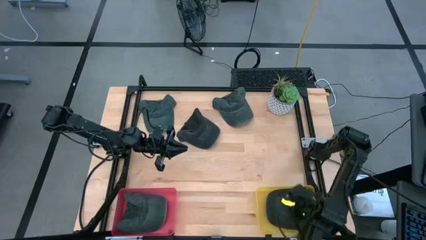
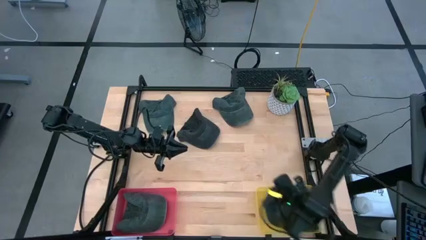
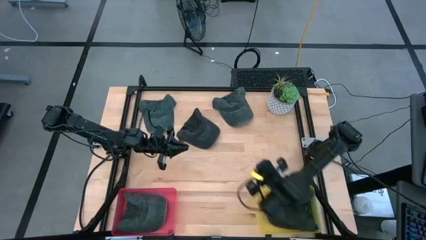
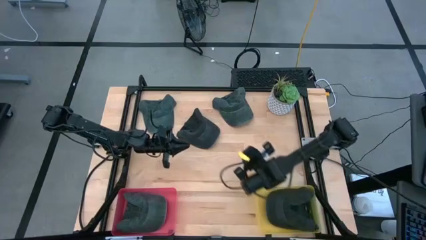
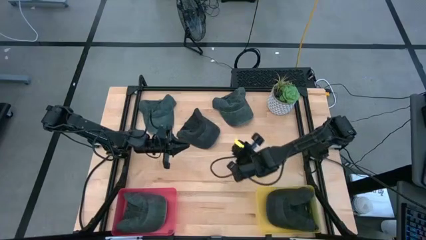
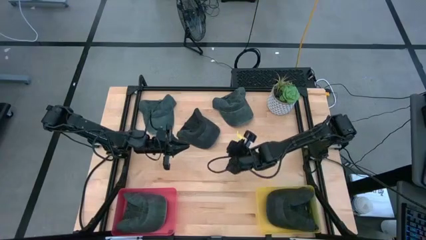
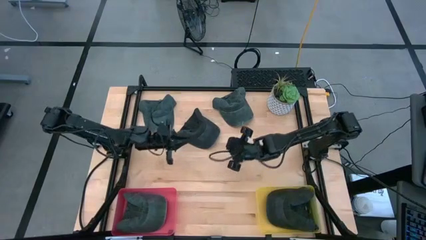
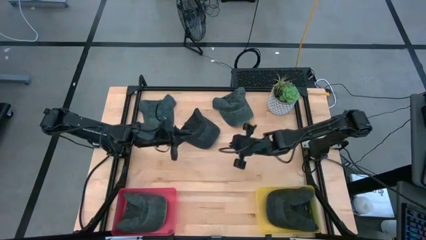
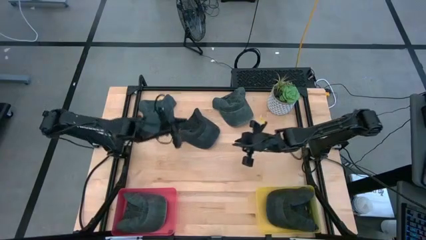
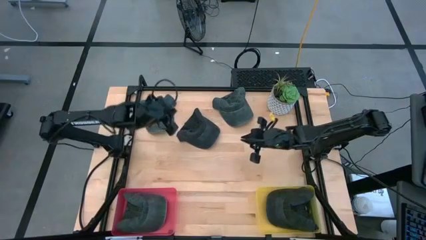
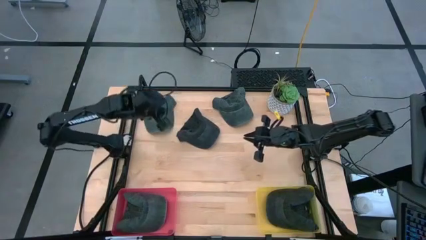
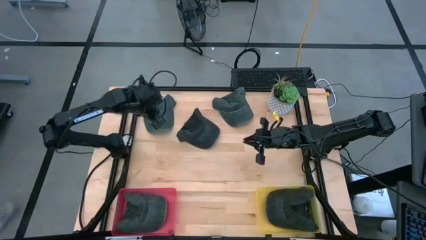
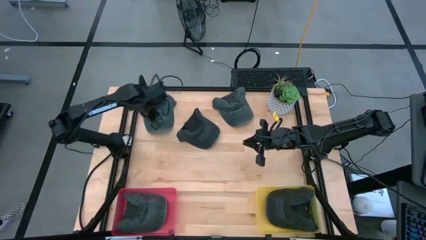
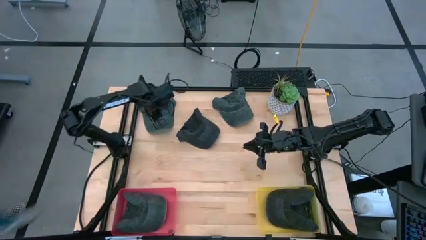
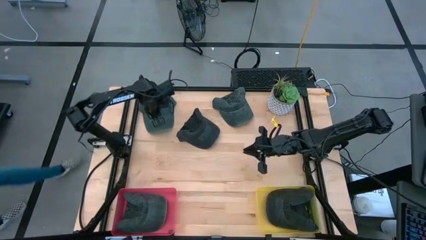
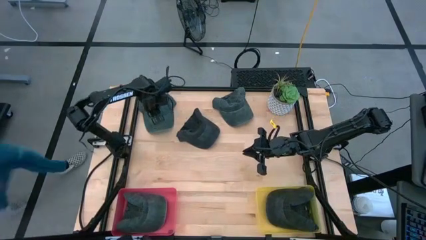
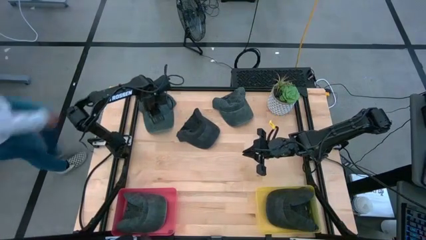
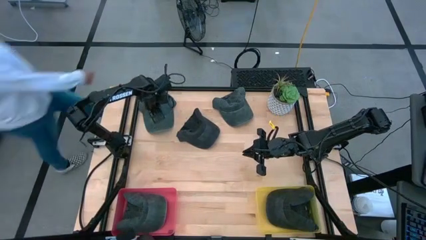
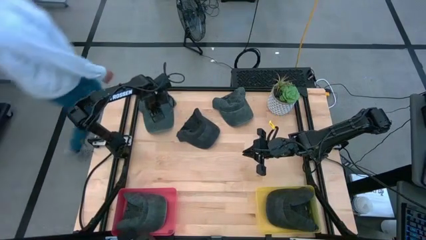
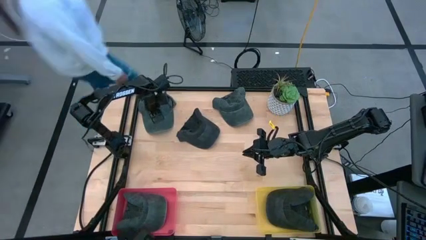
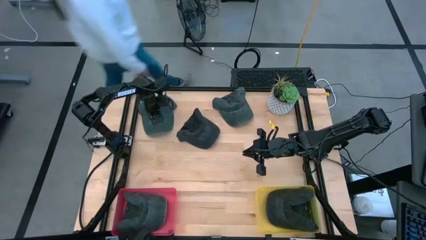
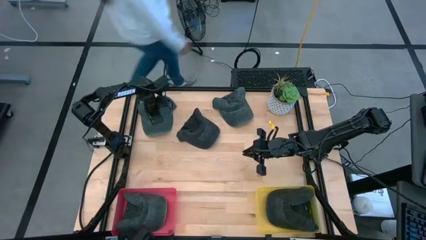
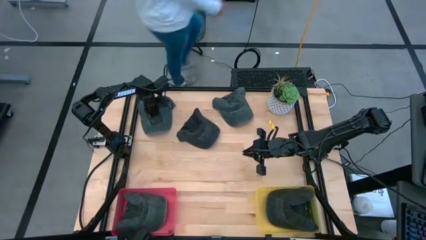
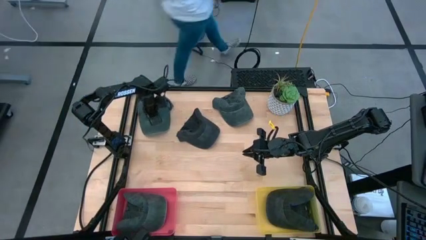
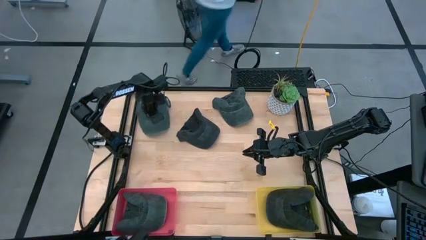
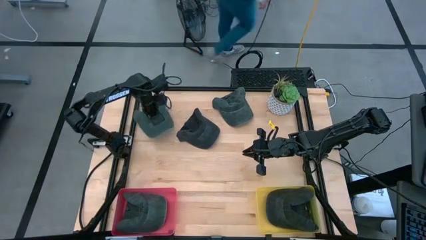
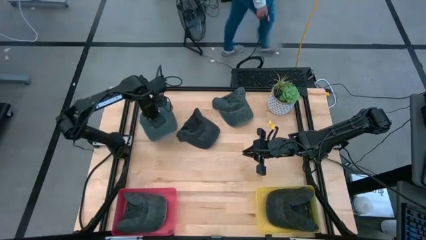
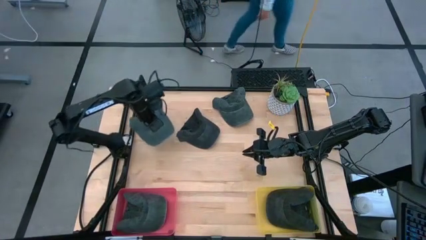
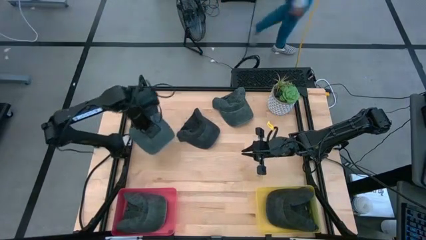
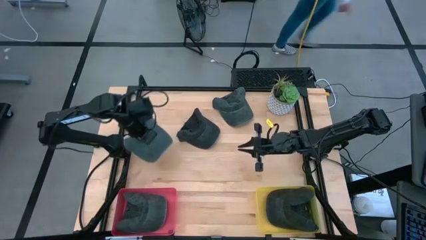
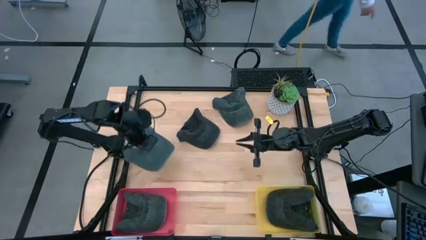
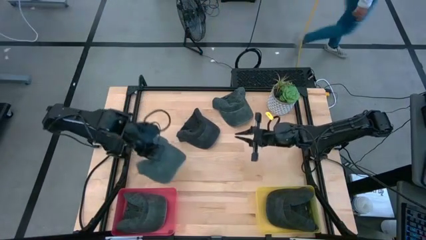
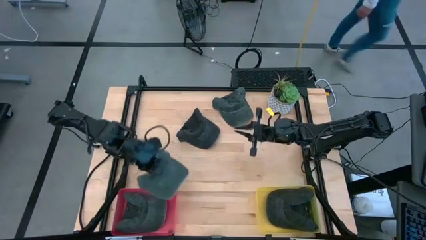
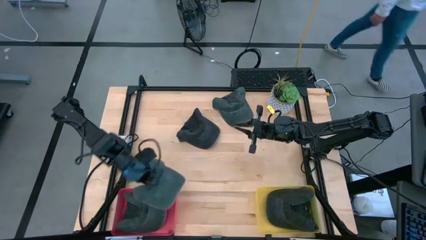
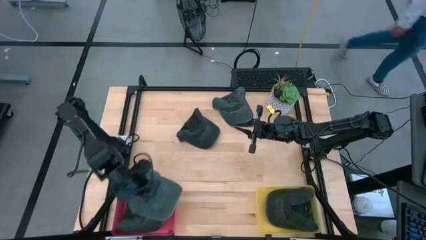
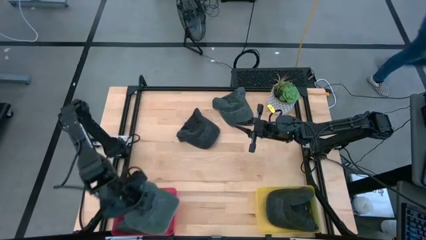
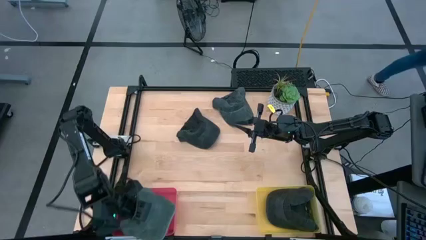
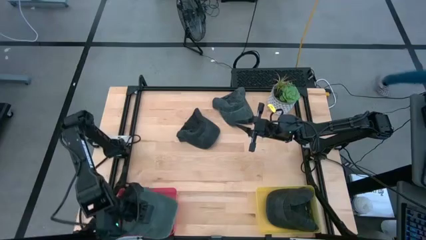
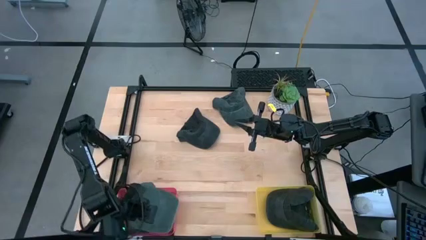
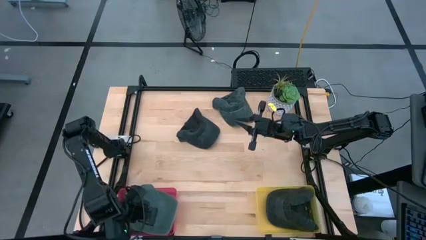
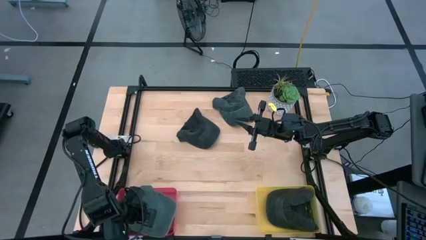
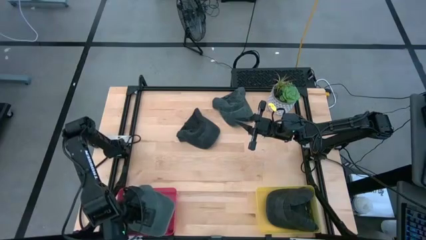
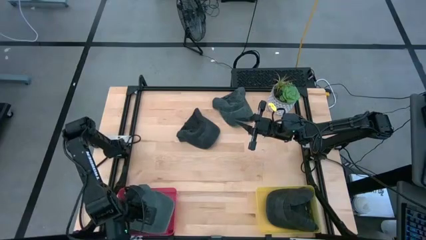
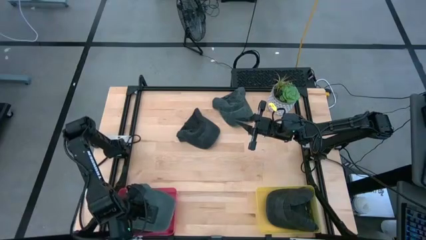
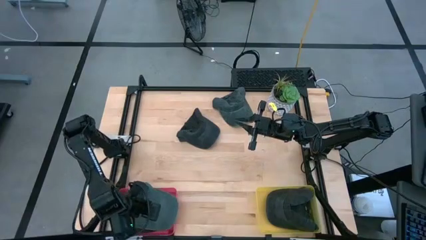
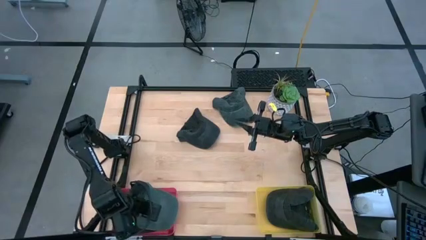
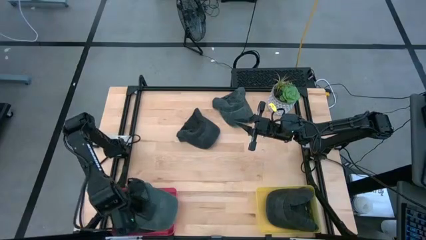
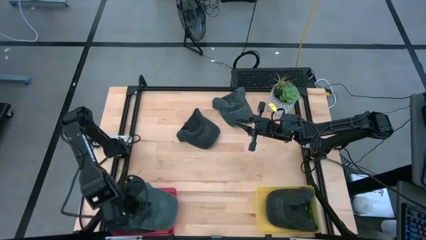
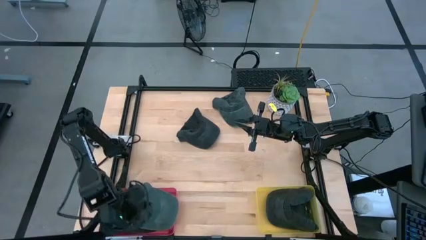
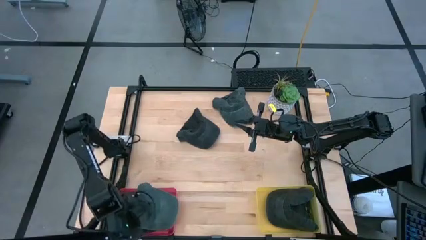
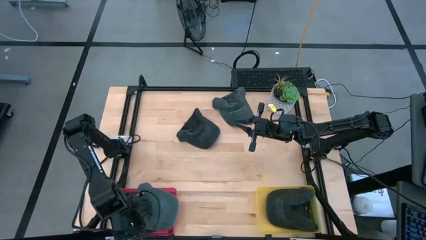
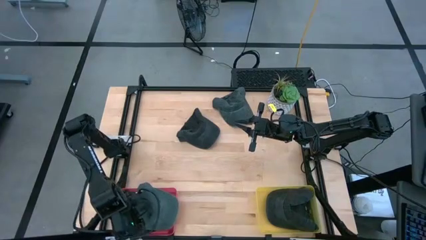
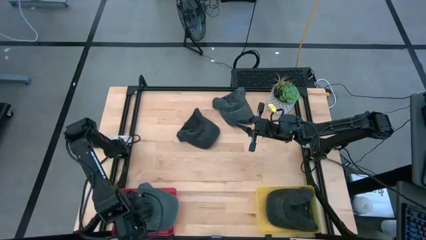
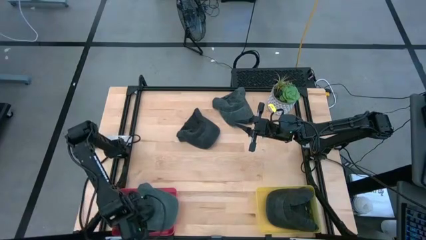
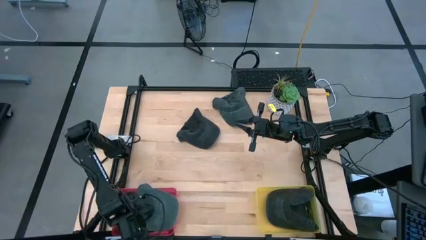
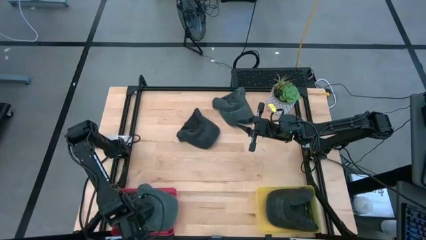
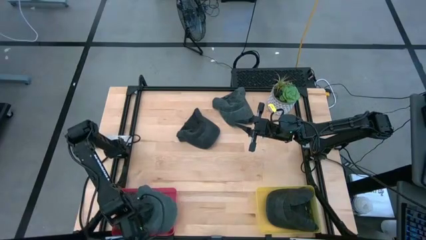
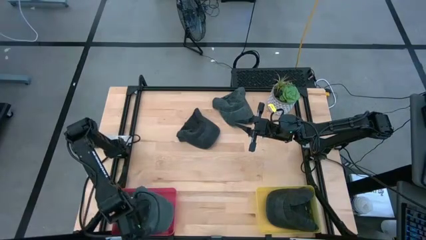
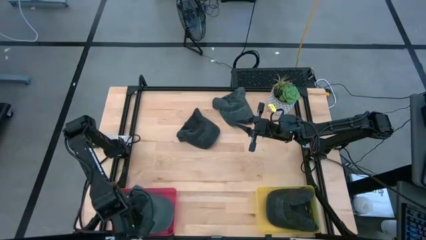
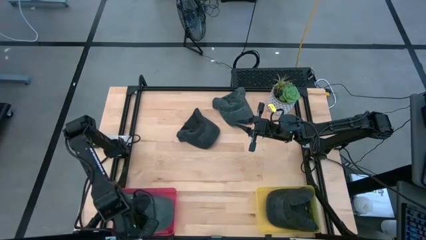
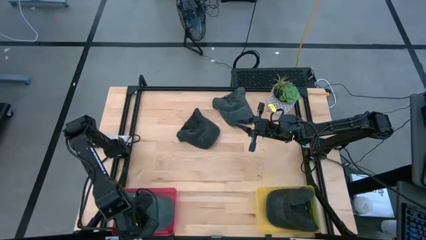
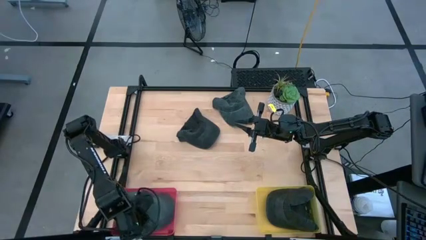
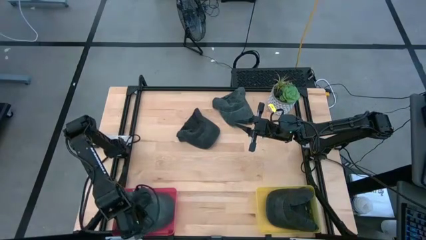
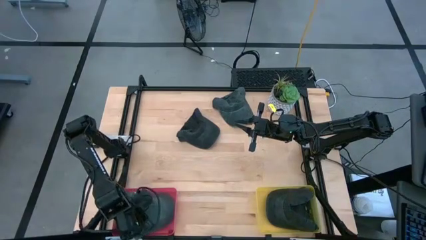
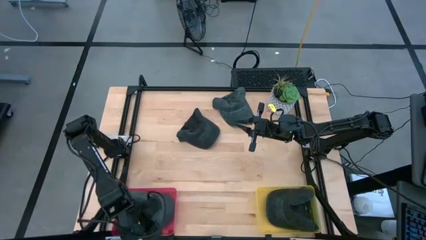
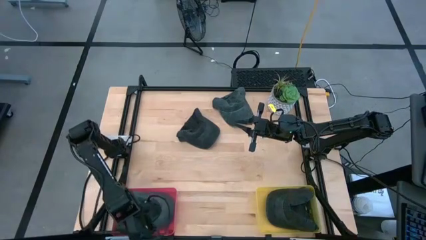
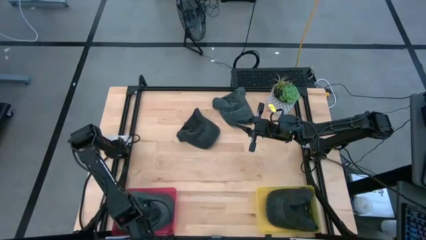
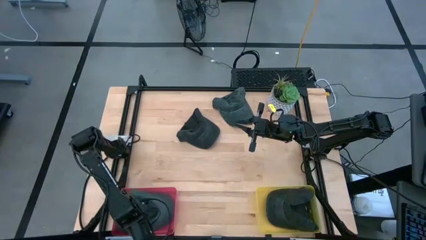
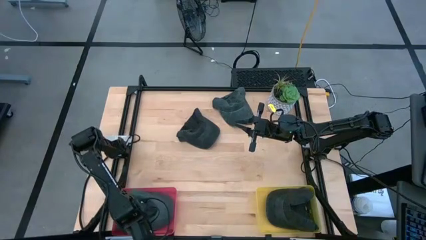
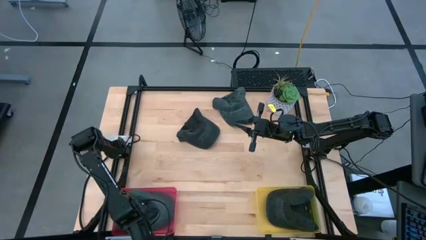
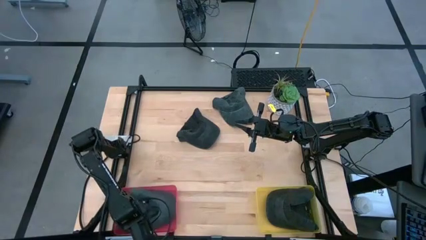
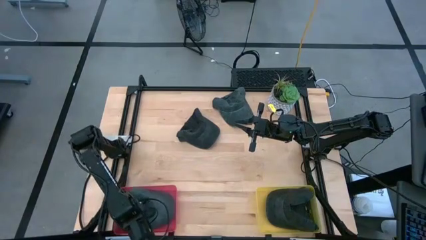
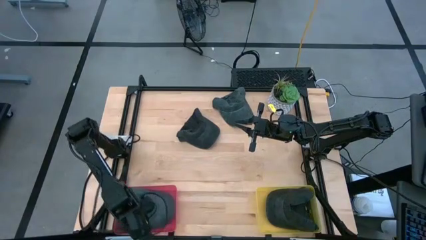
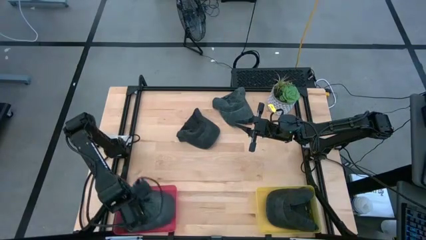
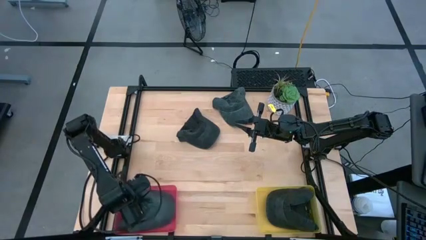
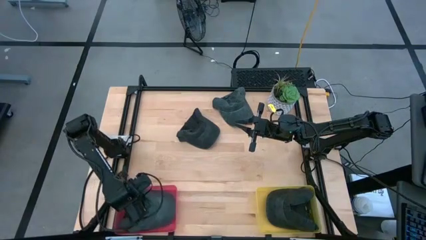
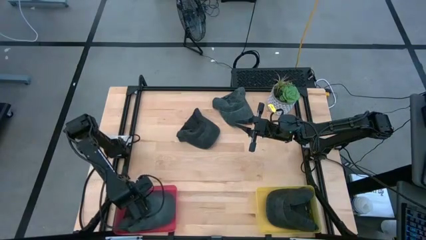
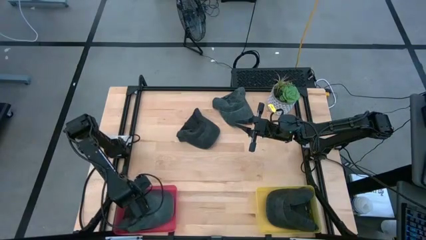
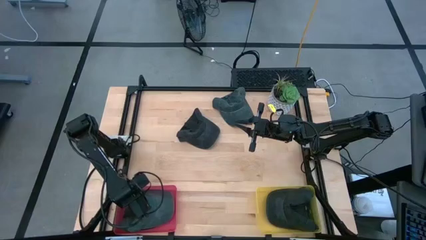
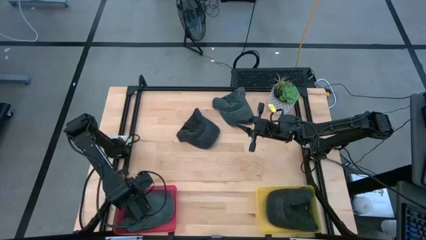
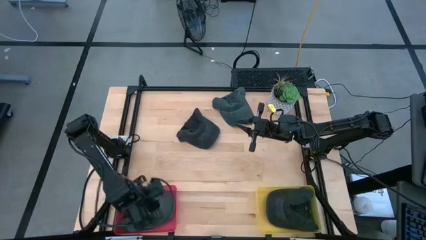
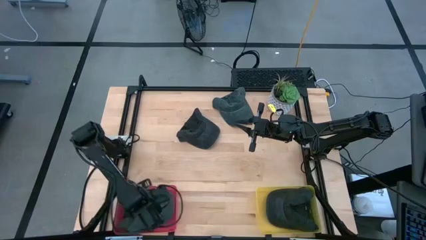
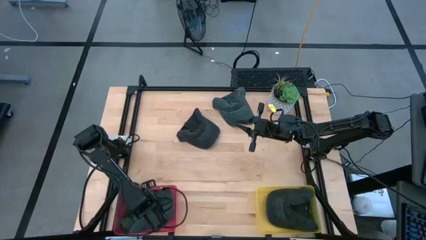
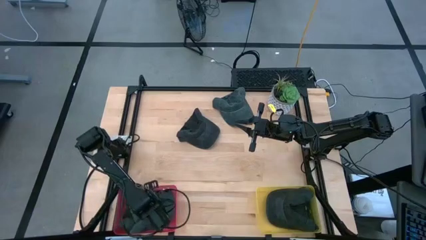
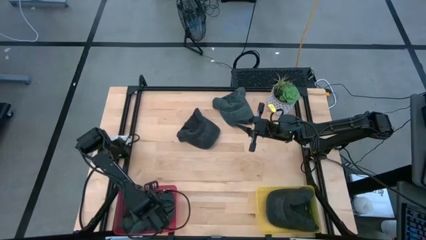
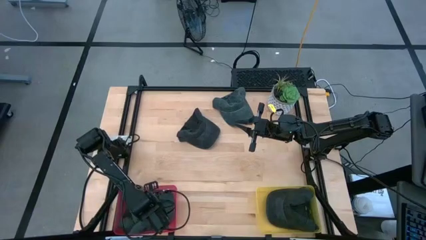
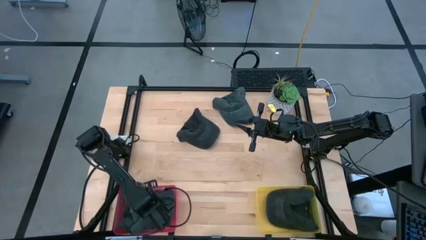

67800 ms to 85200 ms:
Task: Pick & Place hat
Put the grey cap into the pink bin
